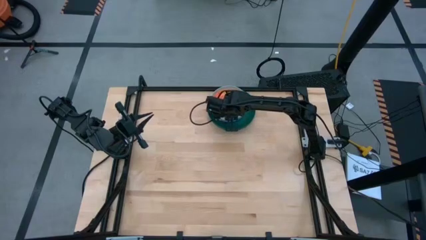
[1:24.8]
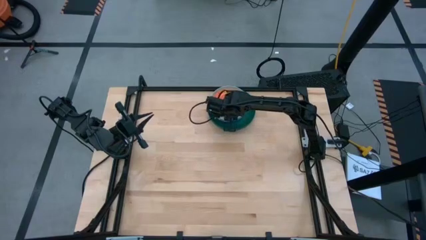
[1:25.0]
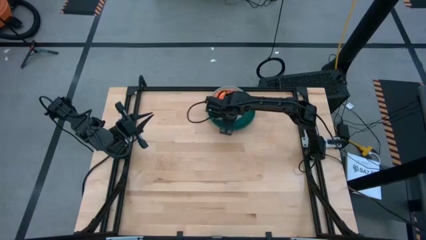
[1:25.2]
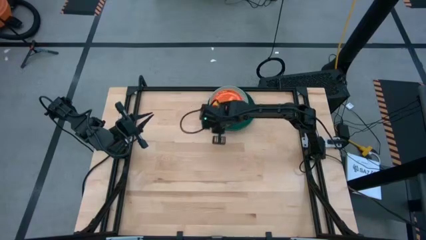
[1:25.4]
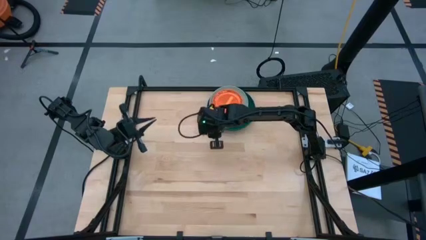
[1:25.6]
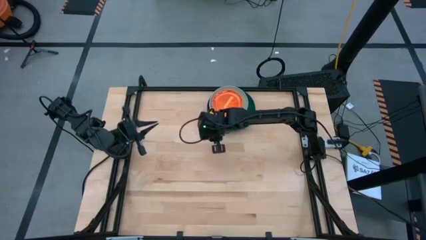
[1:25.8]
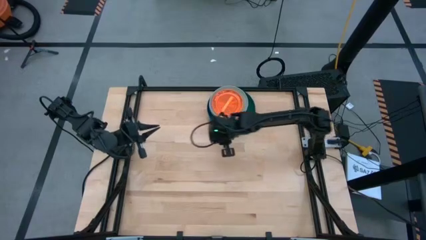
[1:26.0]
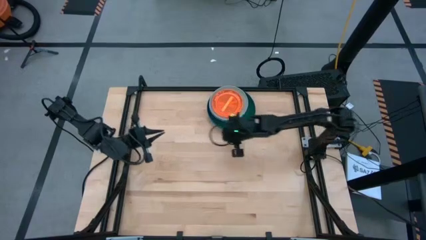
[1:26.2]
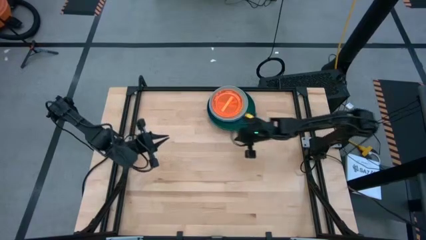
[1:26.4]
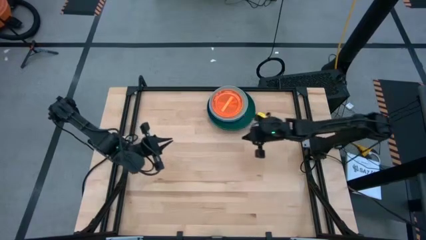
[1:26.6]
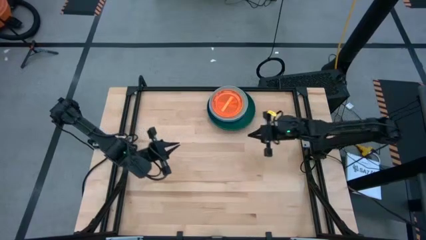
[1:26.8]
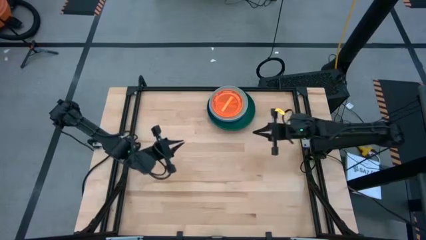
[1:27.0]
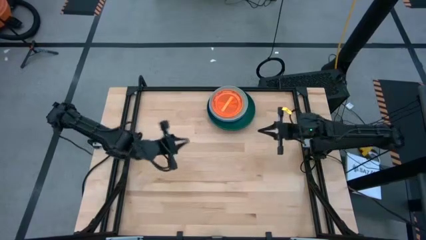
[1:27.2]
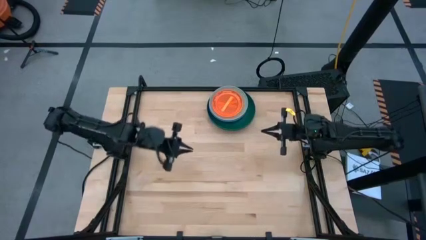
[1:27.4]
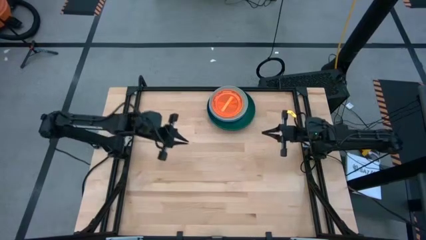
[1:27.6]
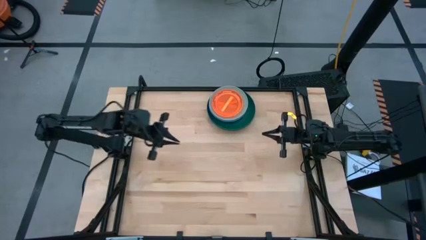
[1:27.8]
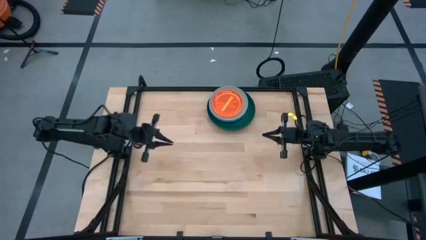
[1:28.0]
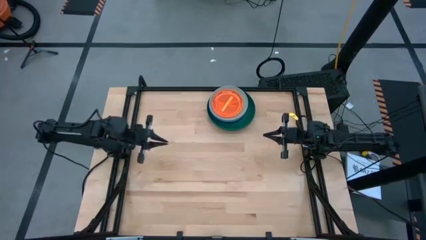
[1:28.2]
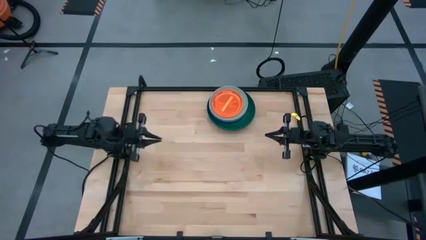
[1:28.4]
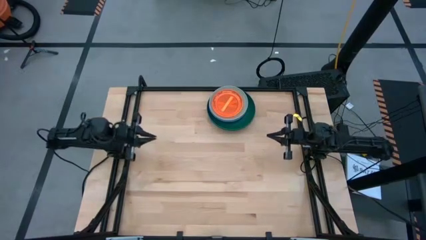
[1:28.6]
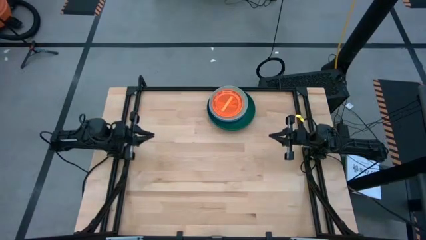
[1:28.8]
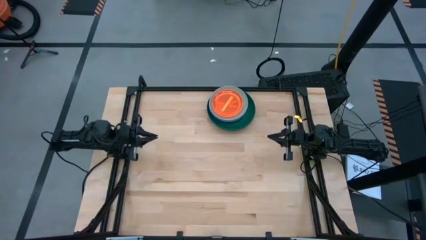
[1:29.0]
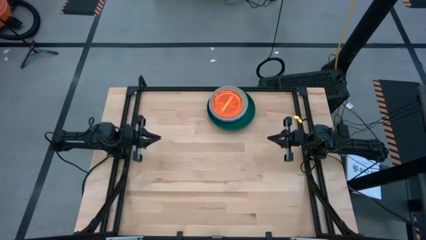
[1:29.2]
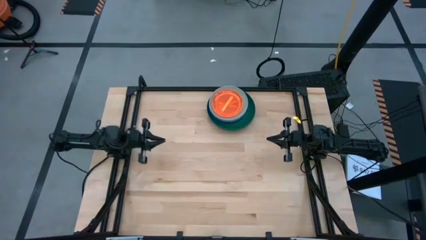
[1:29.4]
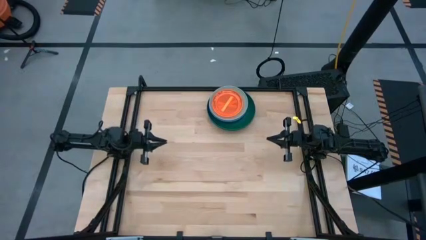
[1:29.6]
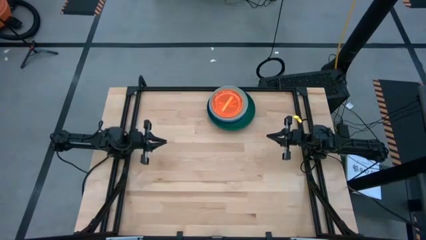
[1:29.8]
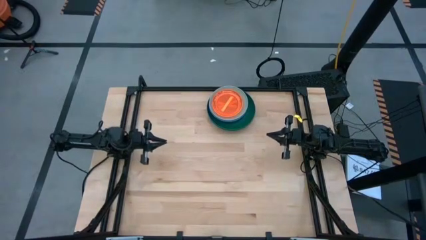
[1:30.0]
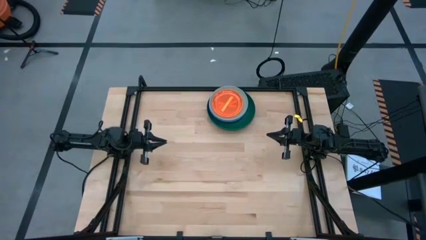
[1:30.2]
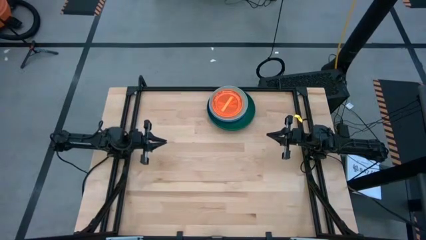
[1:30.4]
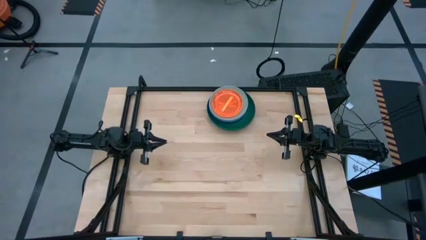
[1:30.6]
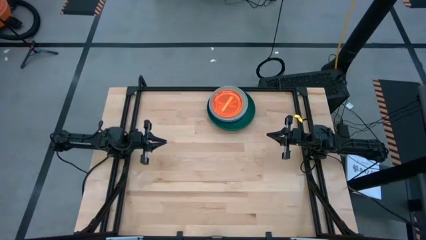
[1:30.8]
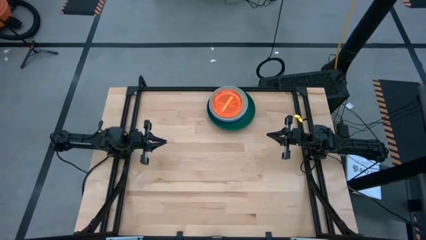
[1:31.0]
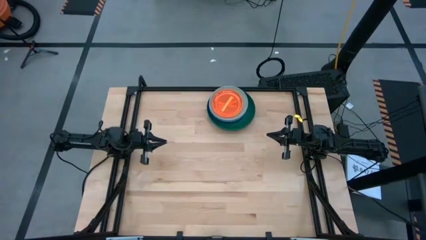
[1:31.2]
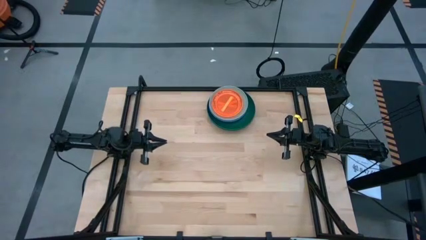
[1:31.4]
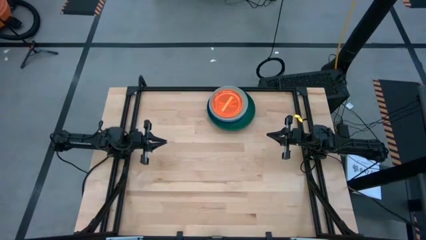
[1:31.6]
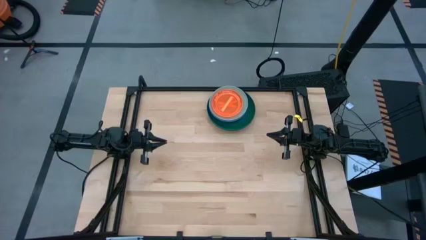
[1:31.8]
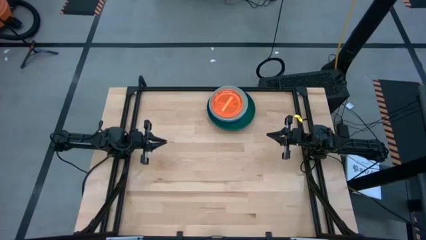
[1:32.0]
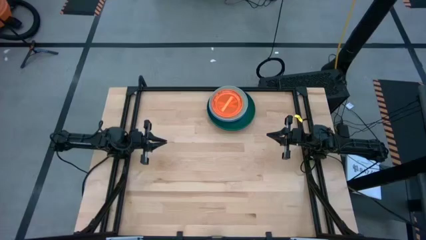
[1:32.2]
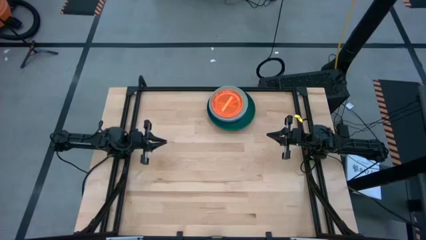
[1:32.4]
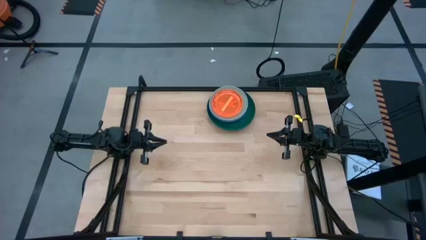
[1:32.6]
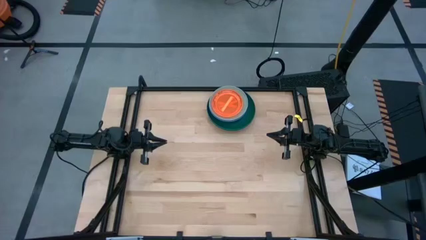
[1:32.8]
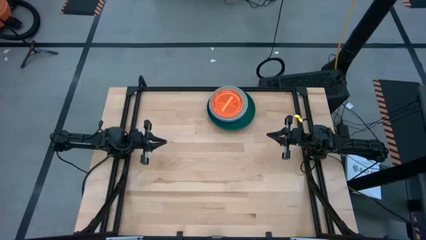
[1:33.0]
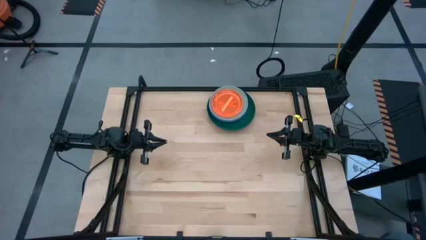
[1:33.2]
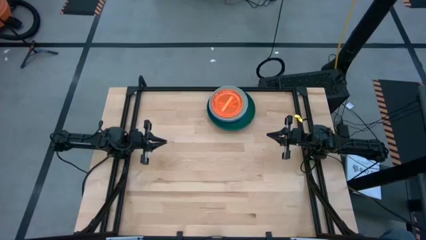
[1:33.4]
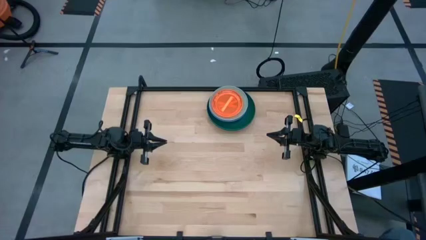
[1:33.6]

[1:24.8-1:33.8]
Task: Stack plastic plates
Return to Home Position

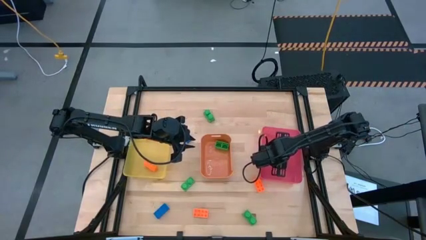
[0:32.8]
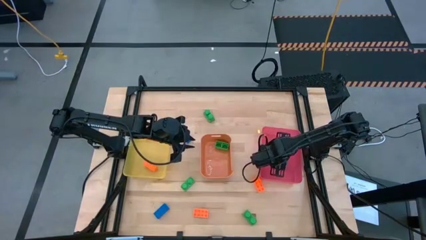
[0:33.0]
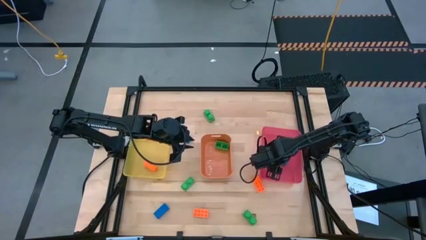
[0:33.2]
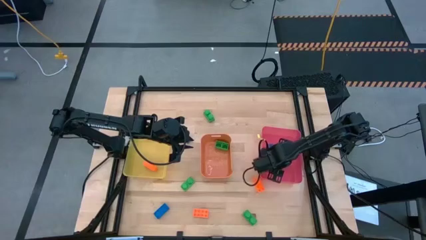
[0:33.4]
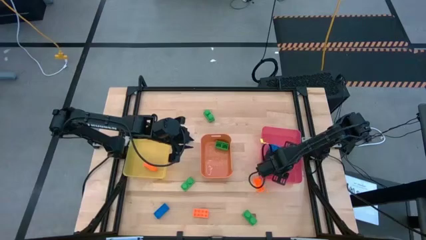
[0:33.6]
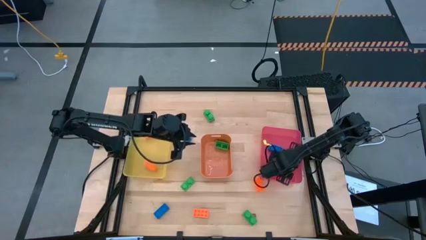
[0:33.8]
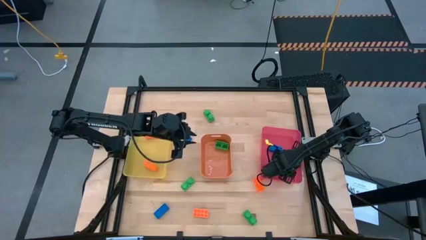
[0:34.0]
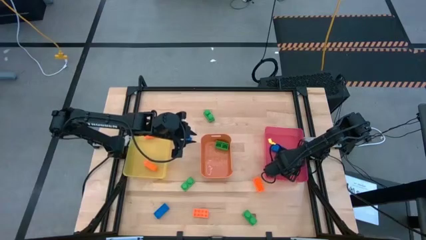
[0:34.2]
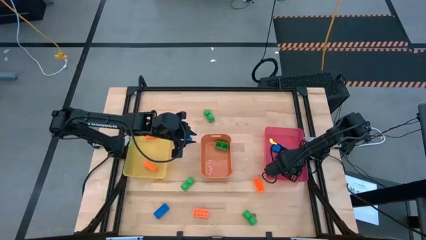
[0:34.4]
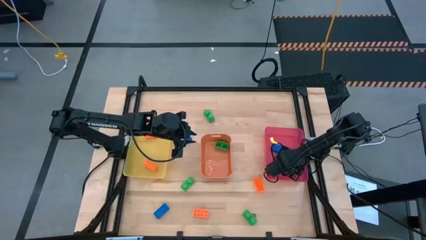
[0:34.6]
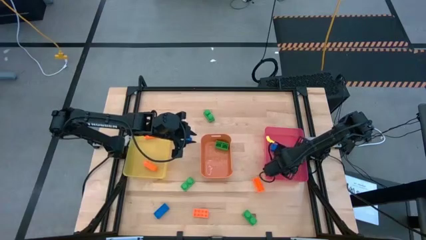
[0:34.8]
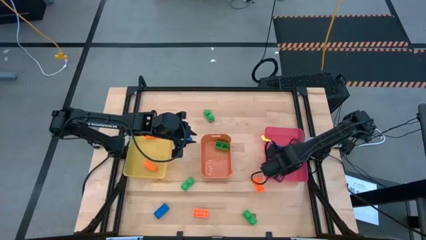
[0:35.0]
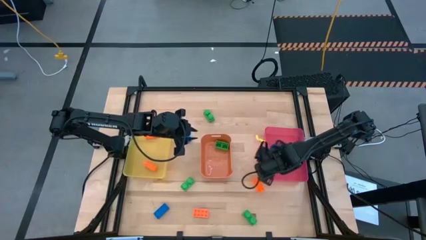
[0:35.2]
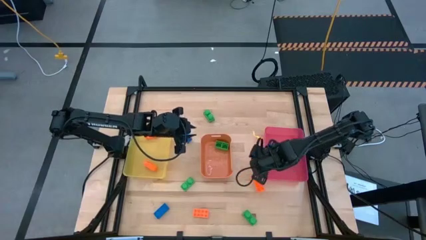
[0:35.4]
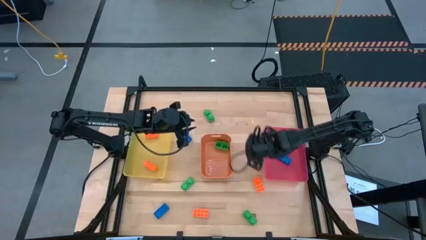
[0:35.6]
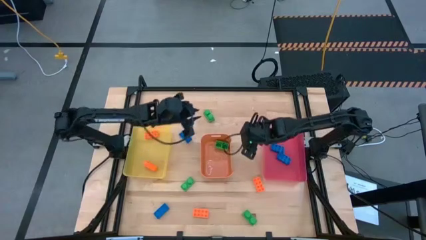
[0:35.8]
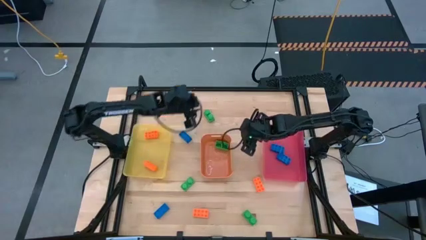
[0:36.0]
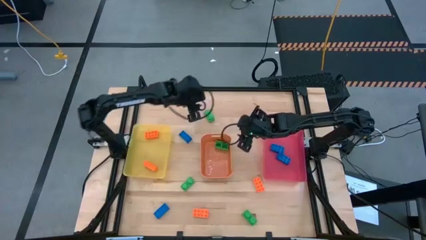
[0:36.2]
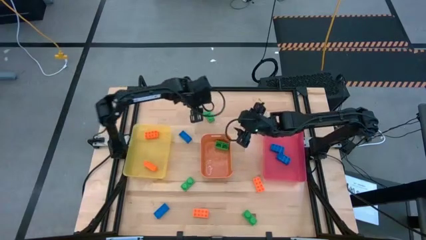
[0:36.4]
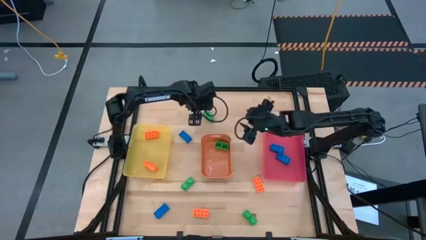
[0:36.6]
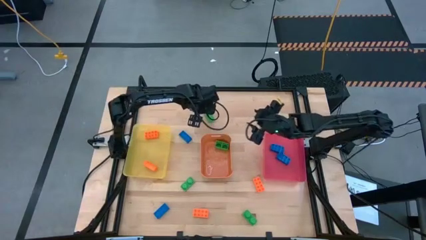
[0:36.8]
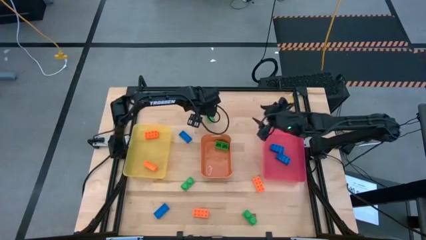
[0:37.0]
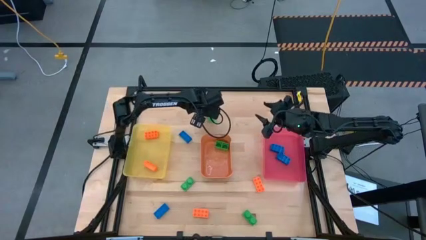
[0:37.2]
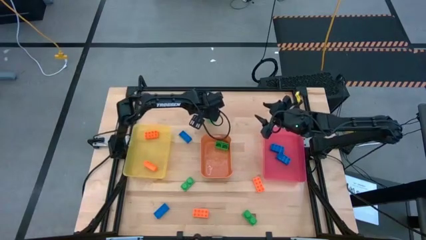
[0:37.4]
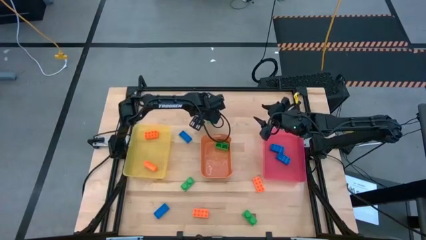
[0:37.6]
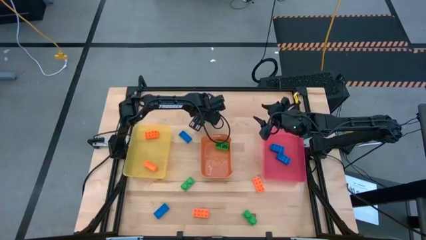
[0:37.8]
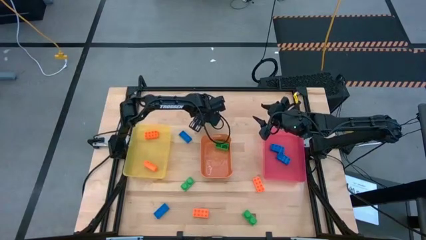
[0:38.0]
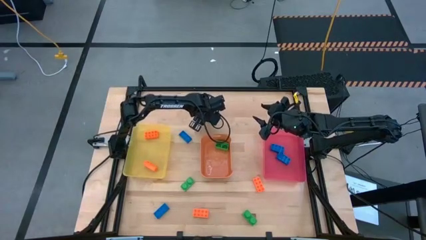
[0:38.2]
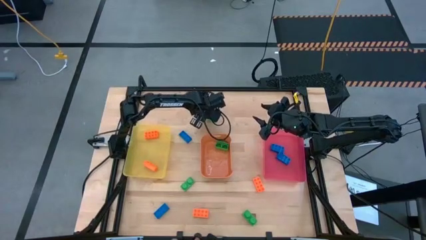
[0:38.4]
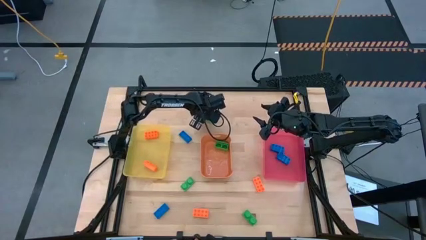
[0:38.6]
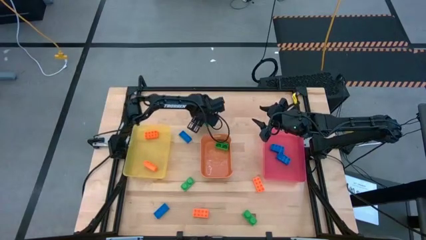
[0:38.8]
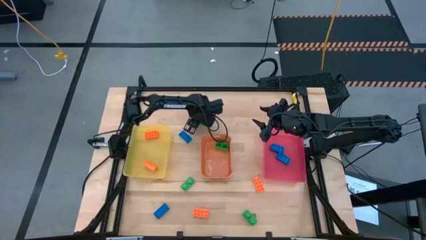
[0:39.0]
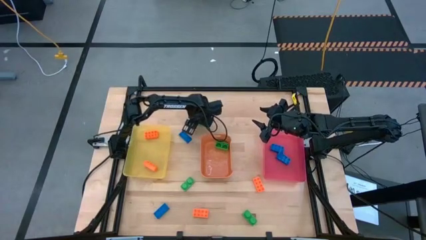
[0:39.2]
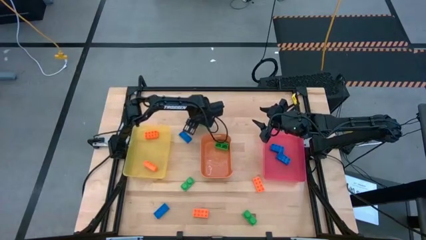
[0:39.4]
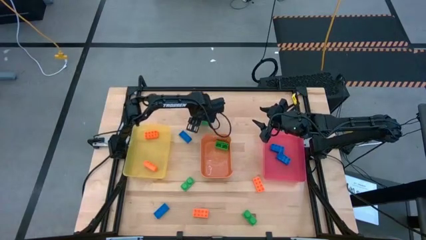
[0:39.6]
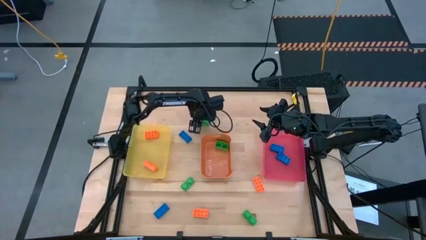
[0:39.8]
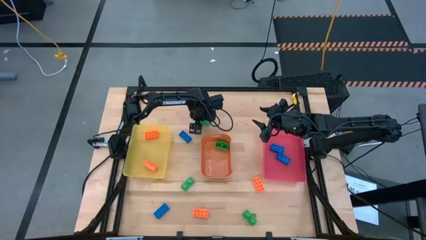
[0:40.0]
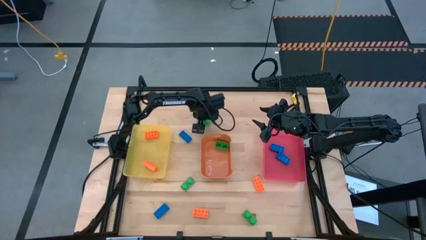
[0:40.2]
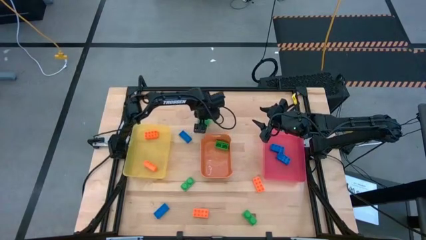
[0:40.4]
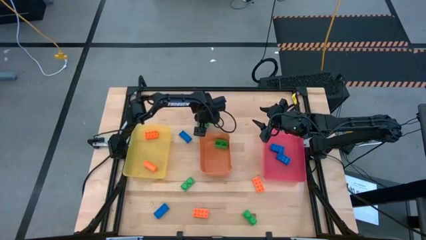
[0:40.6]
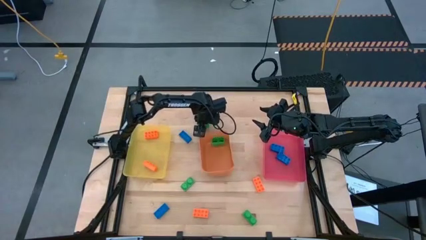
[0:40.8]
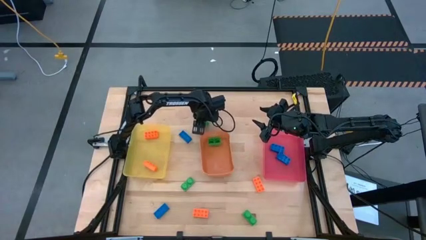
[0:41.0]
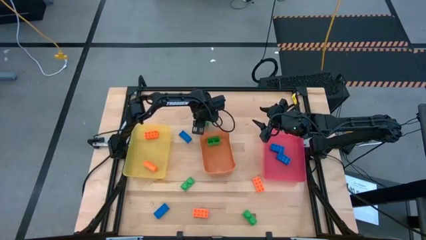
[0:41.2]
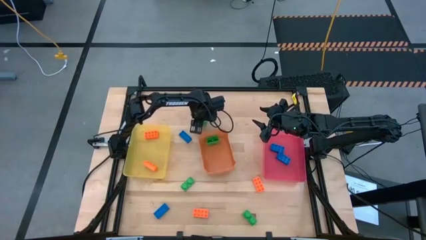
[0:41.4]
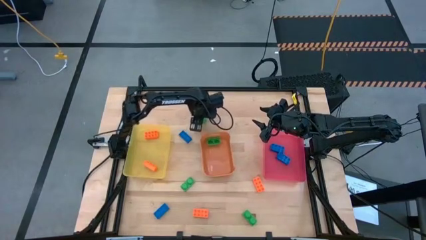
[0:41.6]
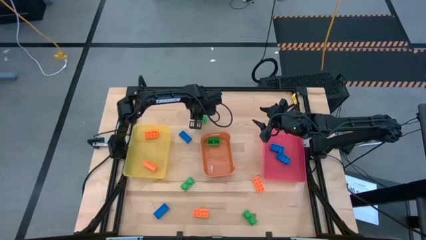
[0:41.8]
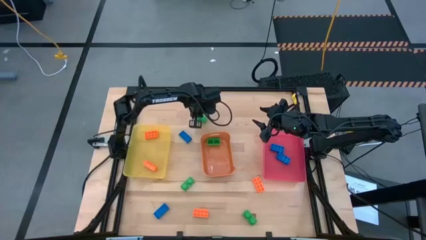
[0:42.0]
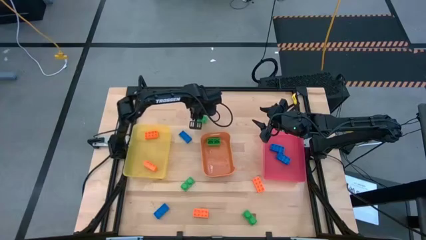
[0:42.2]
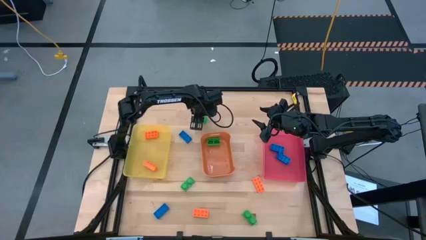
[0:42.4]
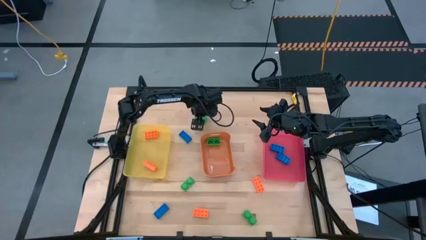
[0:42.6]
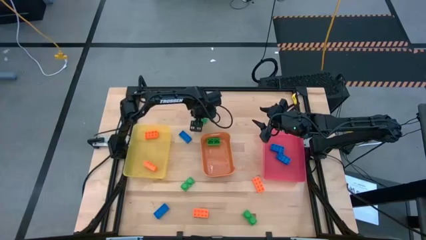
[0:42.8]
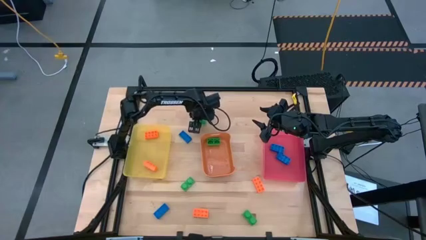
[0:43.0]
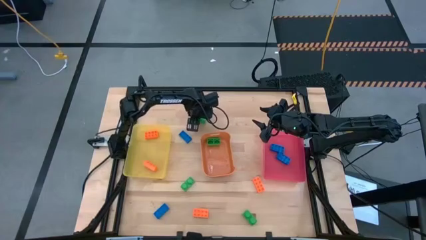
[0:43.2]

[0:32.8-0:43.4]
Task: Sort & place blocks by color
Put the green game piece into the orange bin
